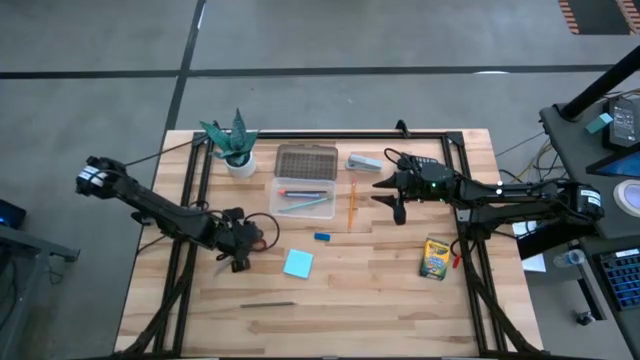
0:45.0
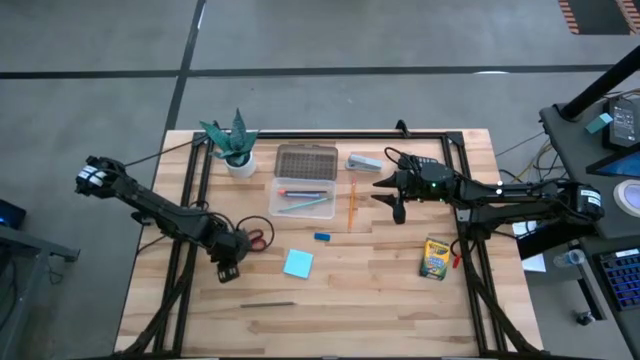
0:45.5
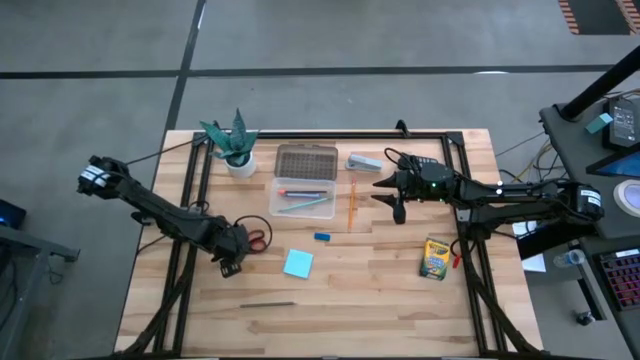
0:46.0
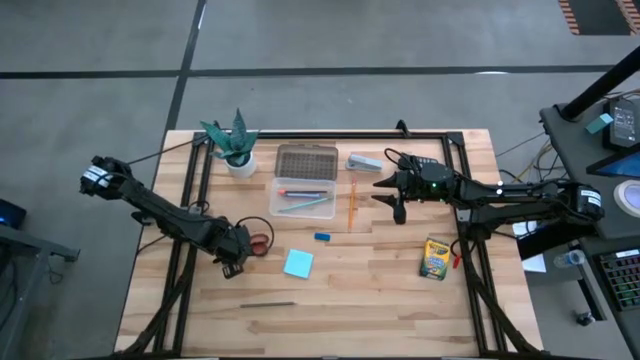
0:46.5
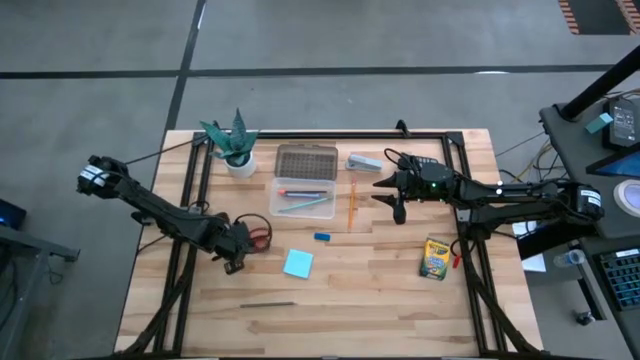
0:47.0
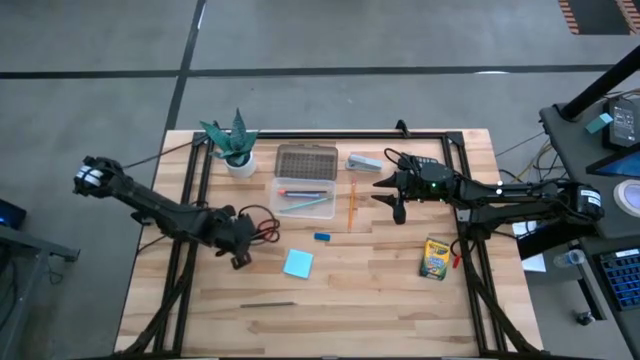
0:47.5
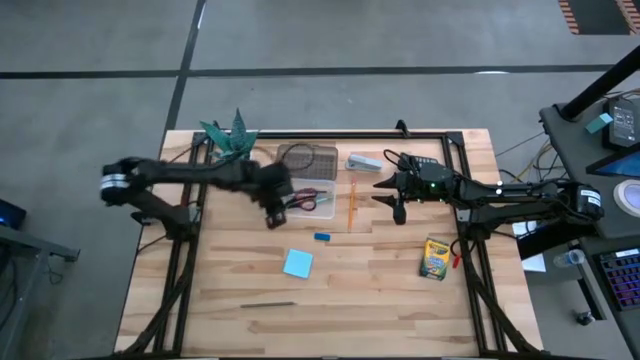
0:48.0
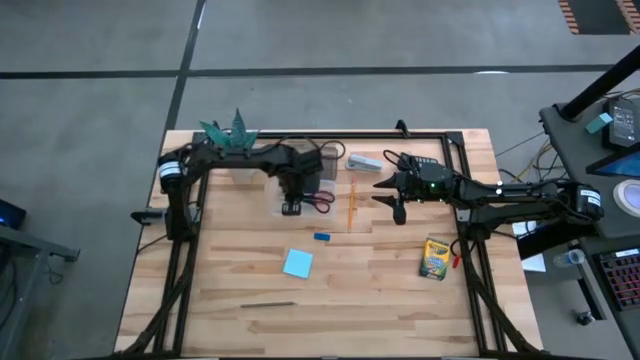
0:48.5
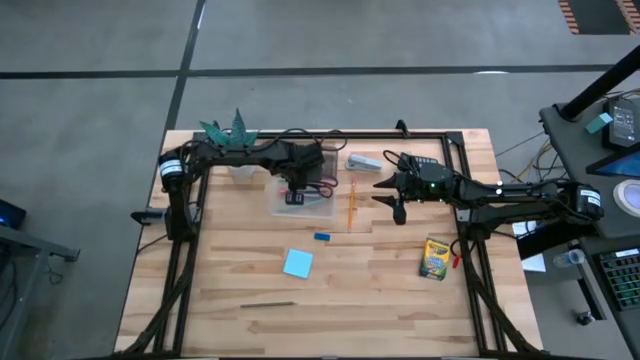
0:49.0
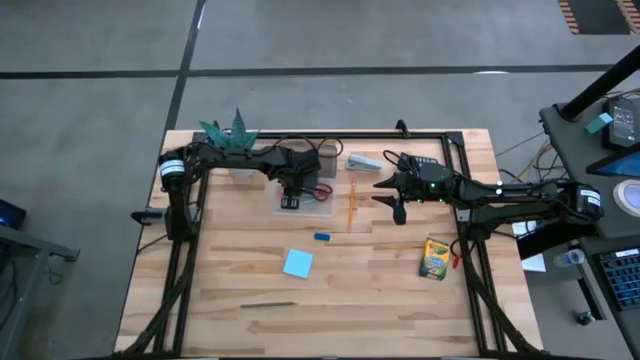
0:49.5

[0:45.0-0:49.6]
Task: Pack school essentials
Put the black scissors into the supply box

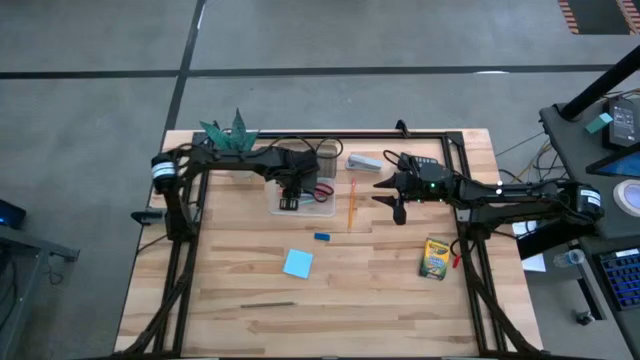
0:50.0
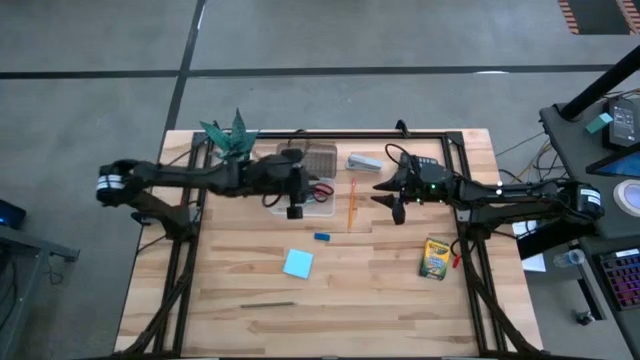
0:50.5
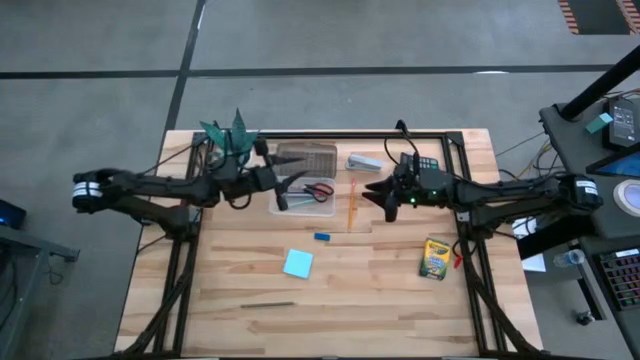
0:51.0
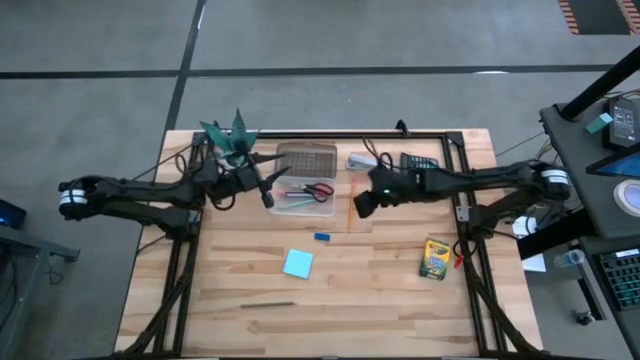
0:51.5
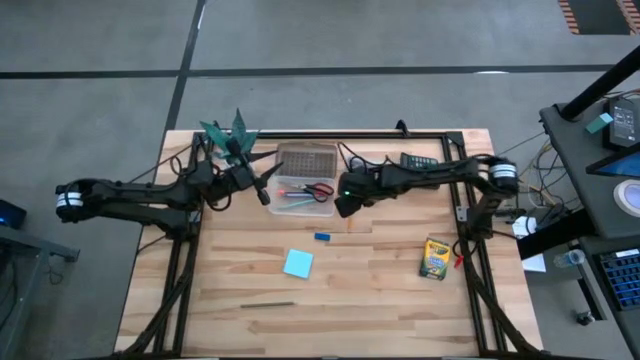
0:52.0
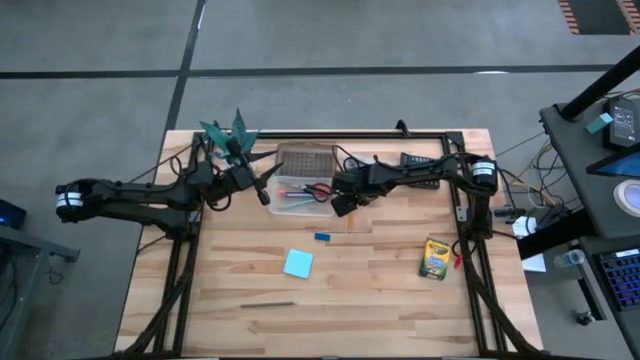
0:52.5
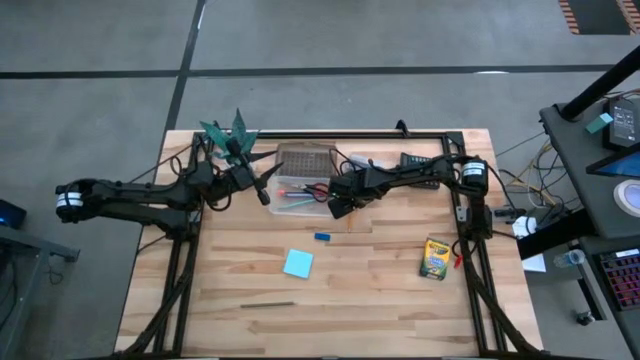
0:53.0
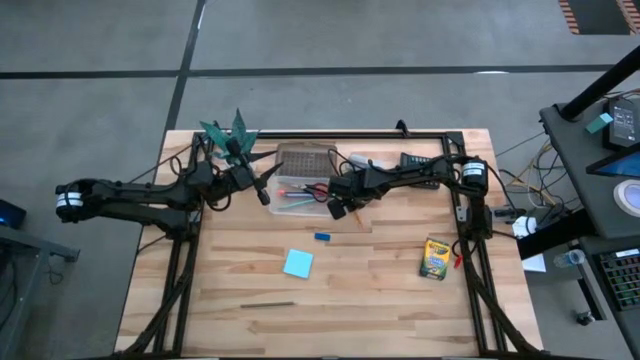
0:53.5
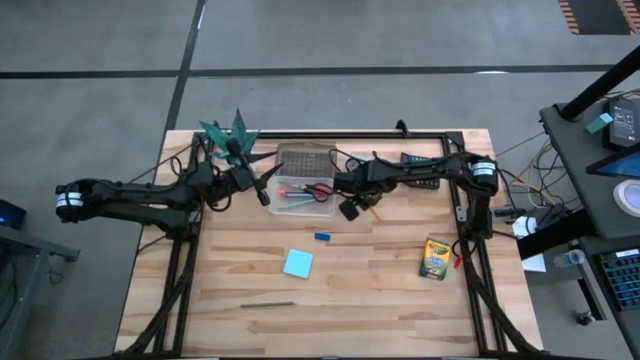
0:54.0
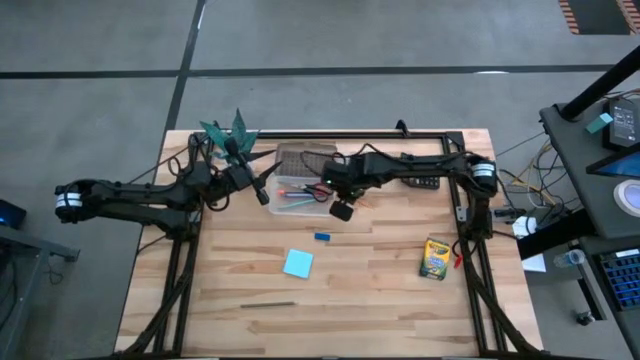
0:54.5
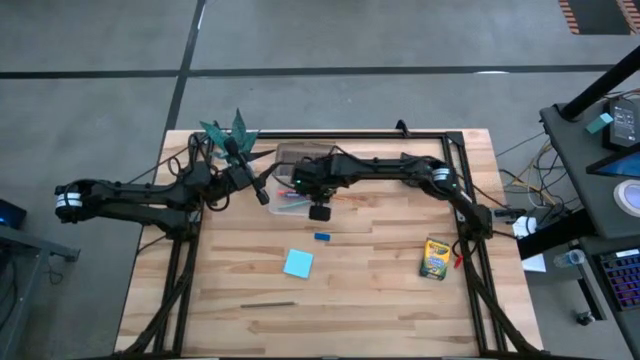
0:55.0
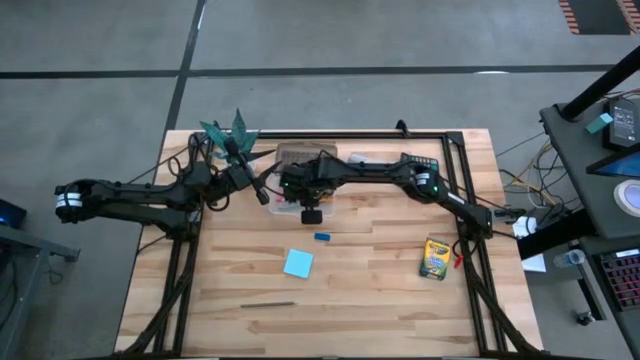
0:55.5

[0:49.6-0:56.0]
Put the orange pencil into the supply box

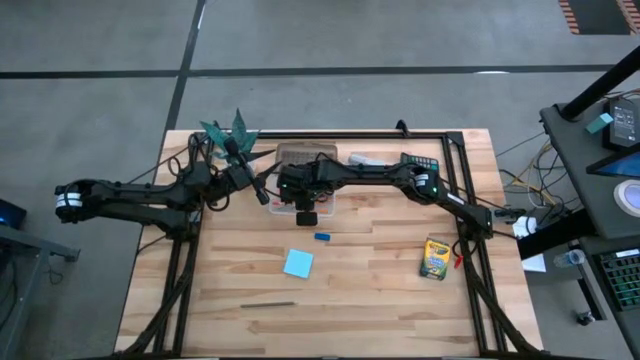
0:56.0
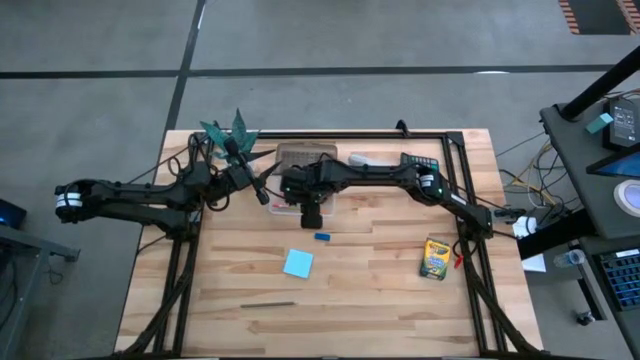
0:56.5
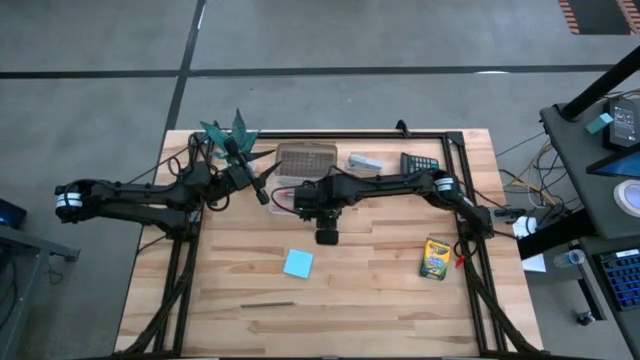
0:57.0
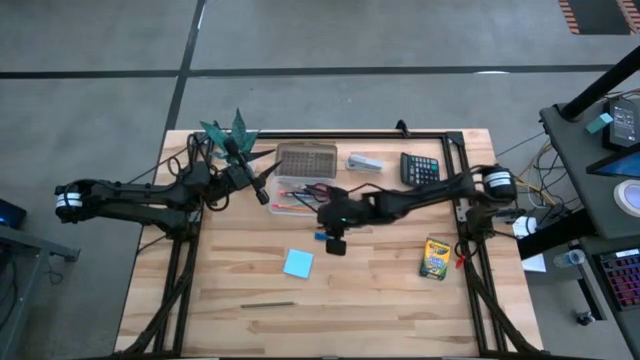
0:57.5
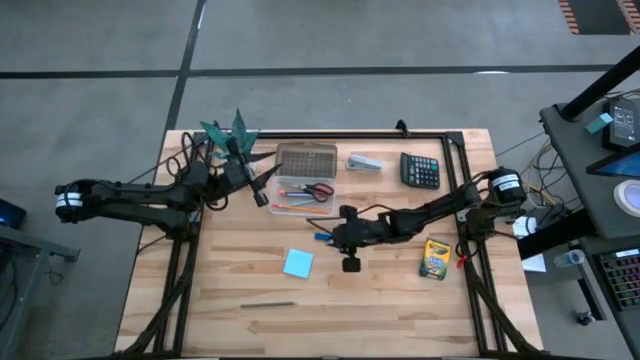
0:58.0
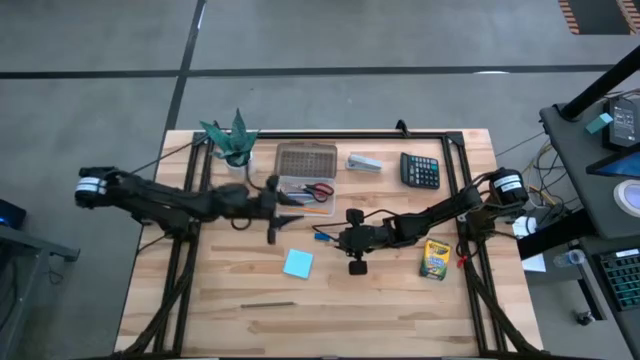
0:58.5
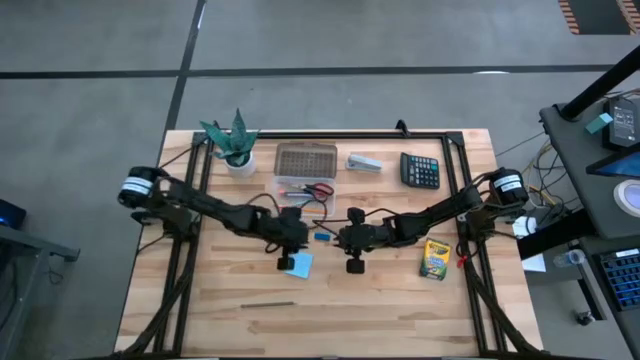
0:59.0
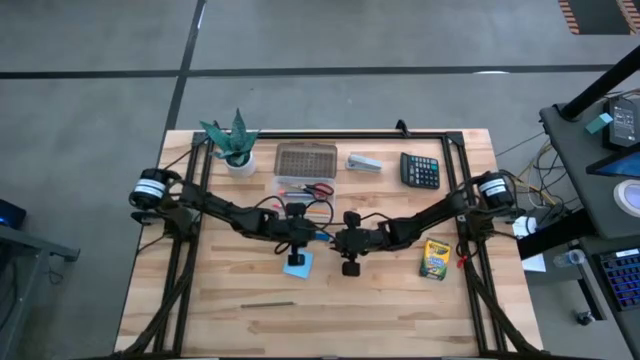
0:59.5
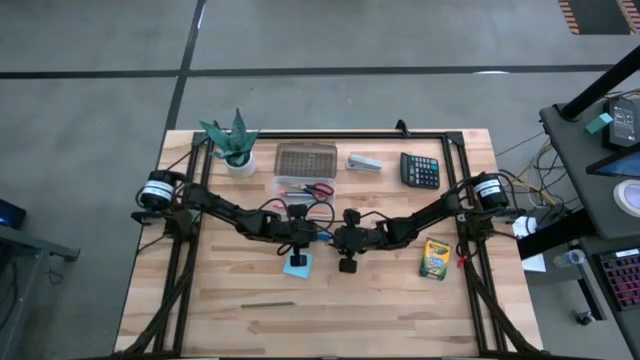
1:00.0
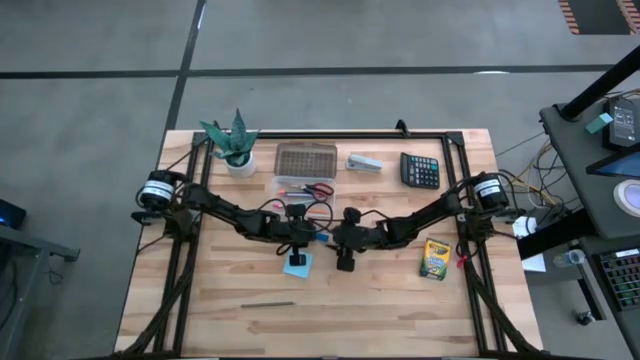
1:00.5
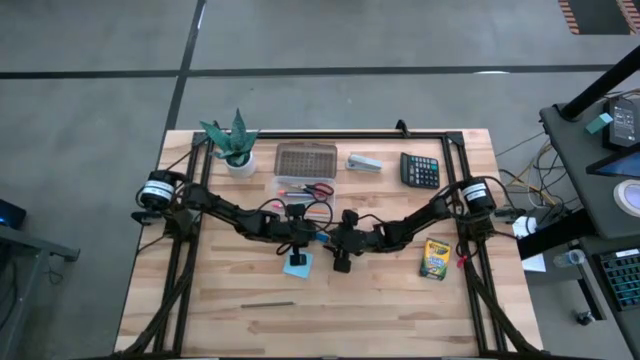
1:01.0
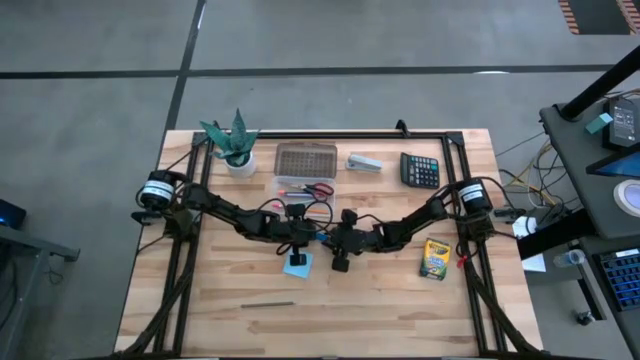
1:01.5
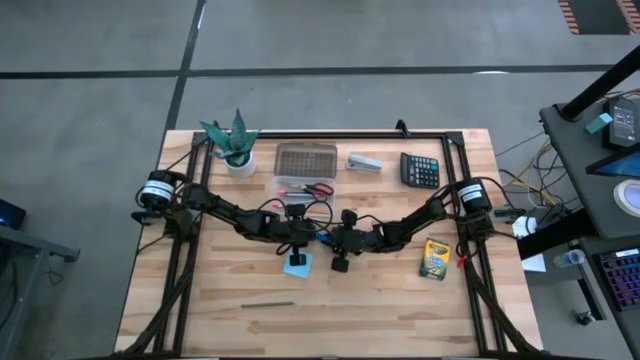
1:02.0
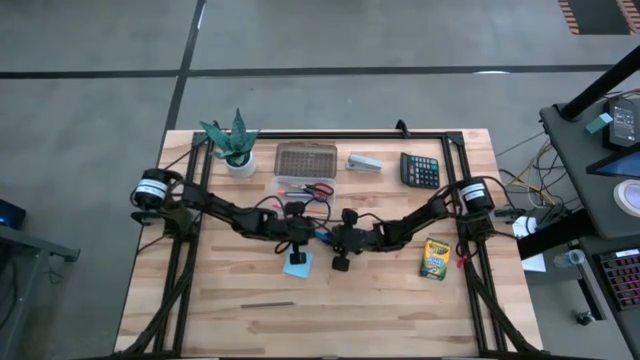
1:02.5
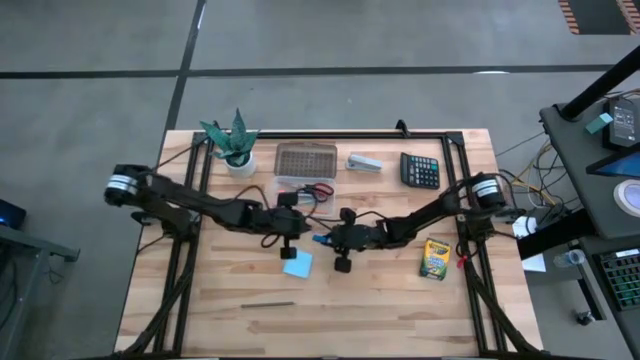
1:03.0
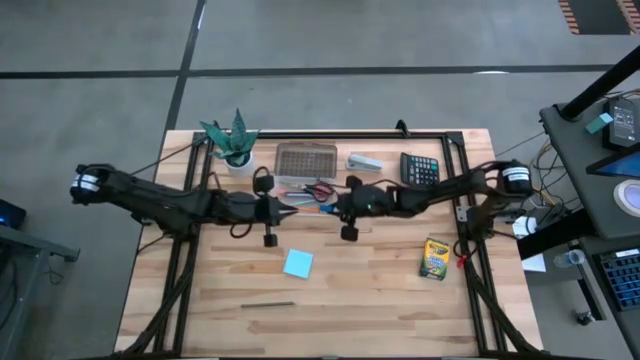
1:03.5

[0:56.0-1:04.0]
Put the blue eraser into the supply box

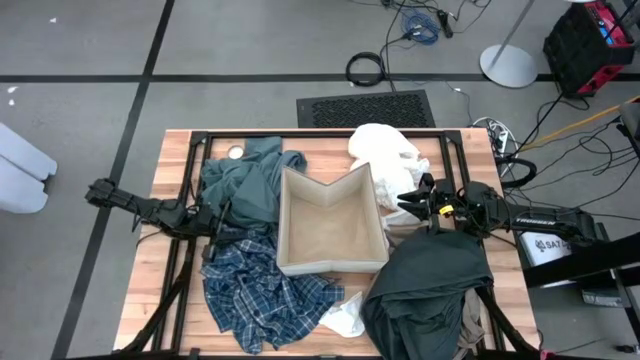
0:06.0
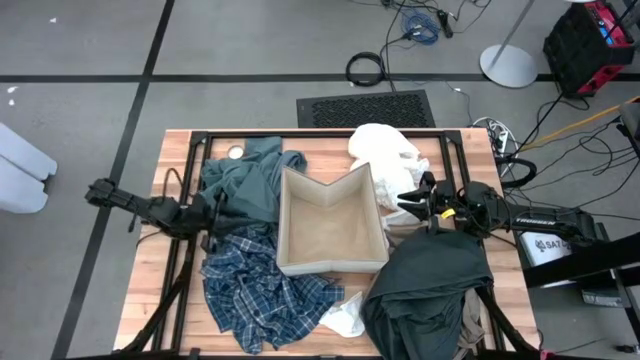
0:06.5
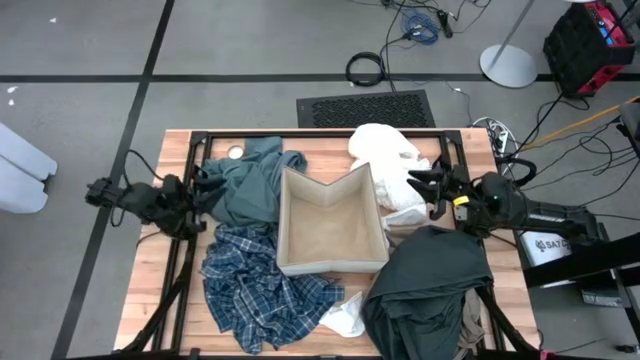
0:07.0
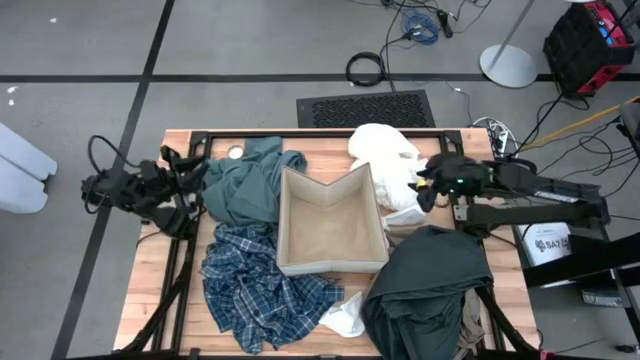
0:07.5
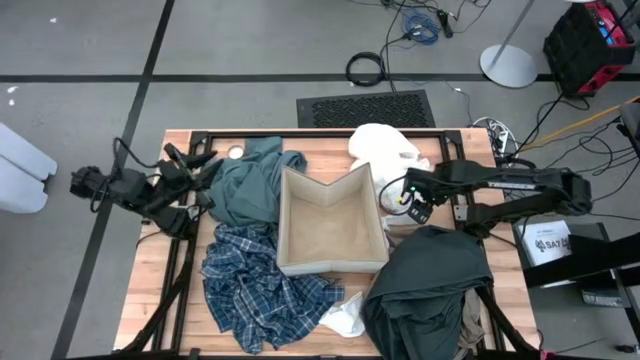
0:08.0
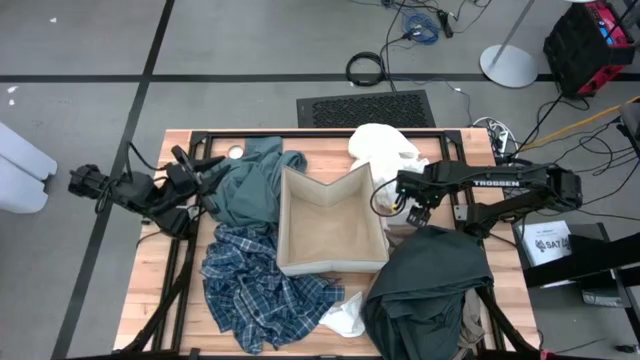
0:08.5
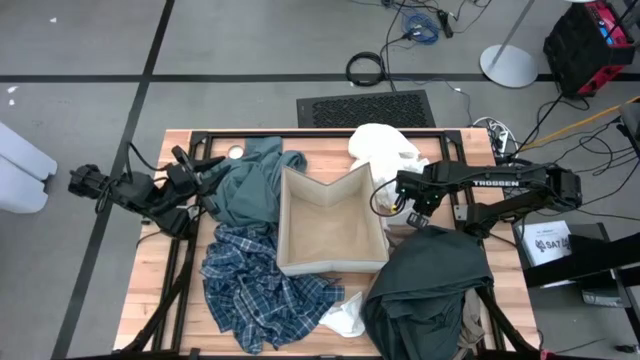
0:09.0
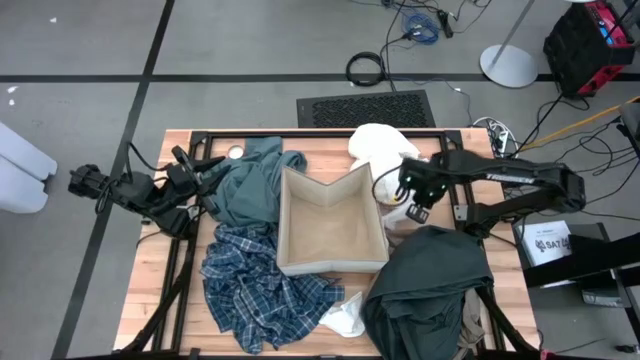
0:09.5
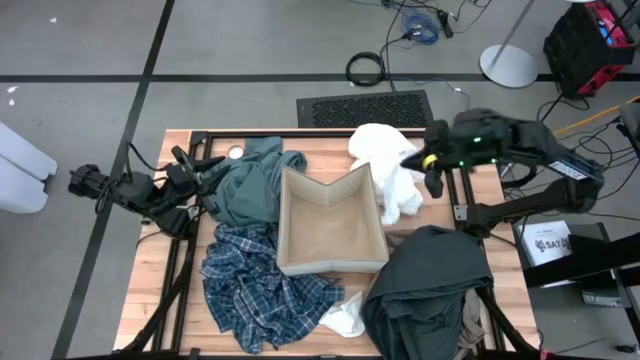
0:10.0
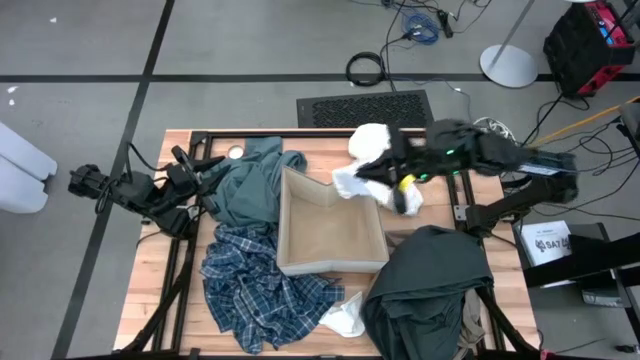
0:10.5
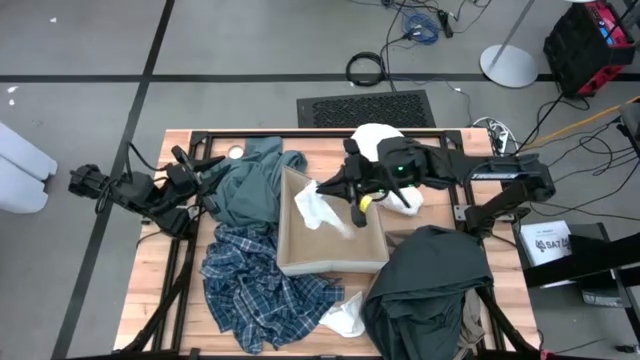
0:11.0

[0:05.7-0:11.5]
Task: Sort clothes
Put the top white sock into the laundry organizer
